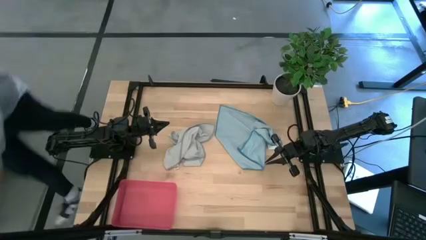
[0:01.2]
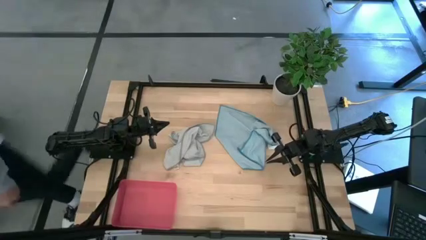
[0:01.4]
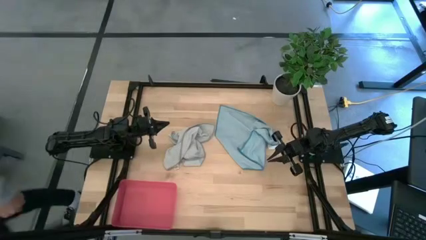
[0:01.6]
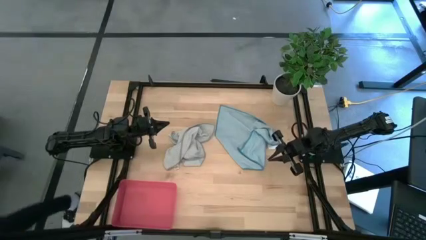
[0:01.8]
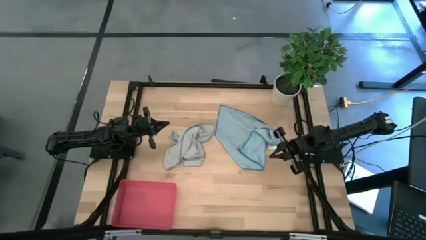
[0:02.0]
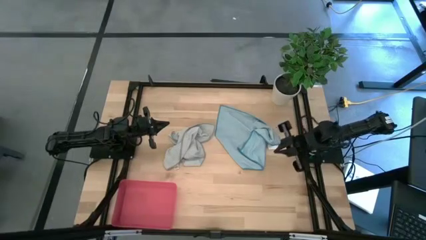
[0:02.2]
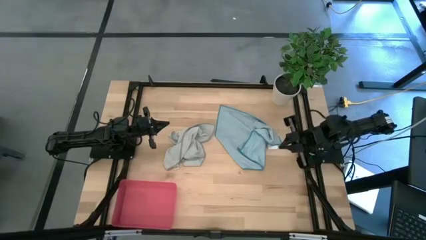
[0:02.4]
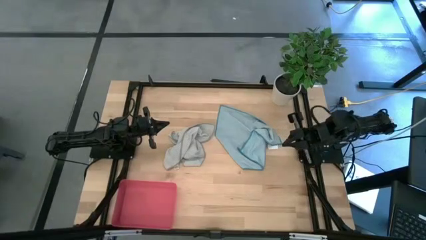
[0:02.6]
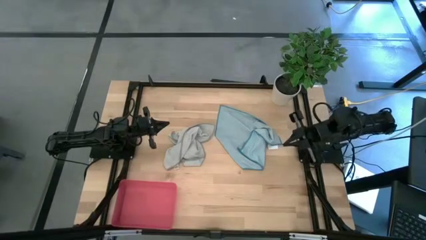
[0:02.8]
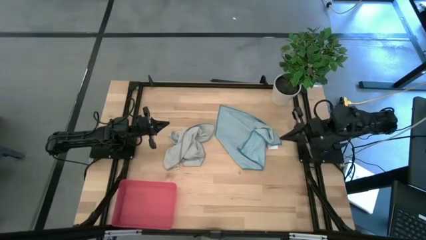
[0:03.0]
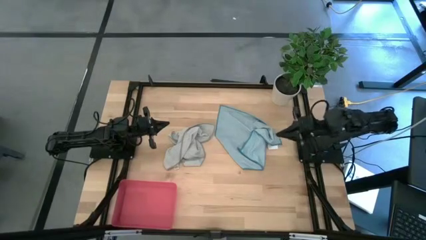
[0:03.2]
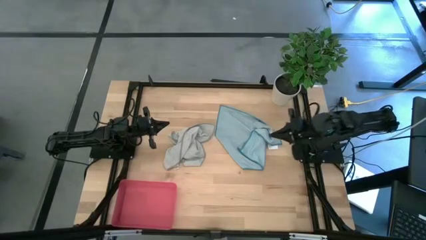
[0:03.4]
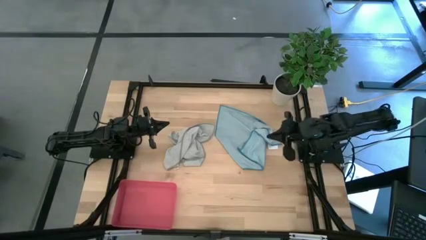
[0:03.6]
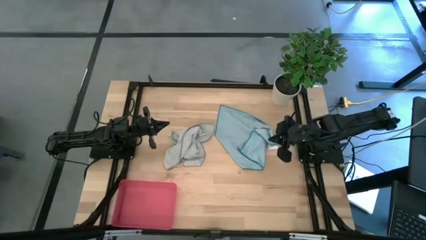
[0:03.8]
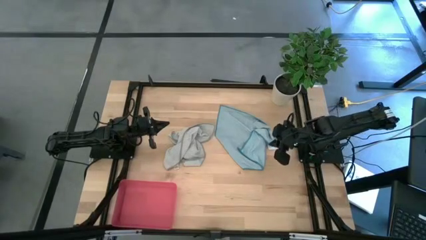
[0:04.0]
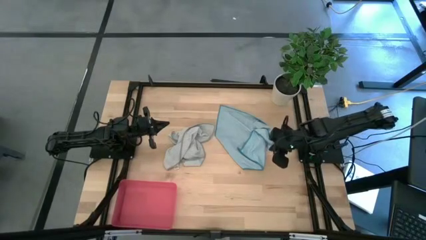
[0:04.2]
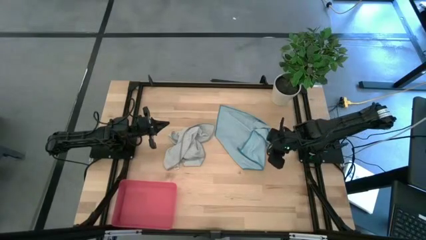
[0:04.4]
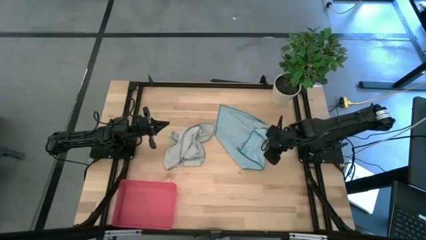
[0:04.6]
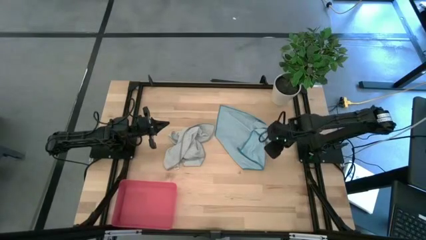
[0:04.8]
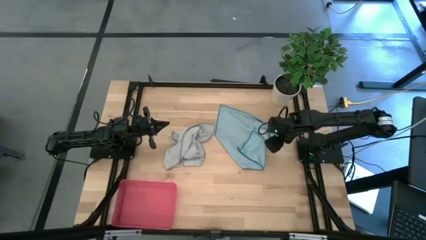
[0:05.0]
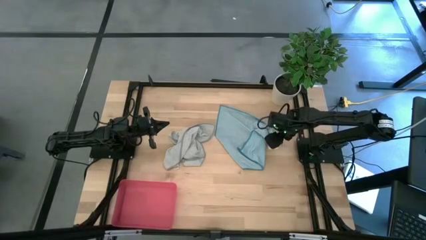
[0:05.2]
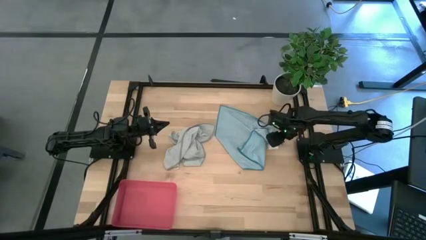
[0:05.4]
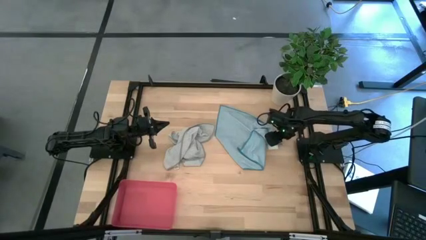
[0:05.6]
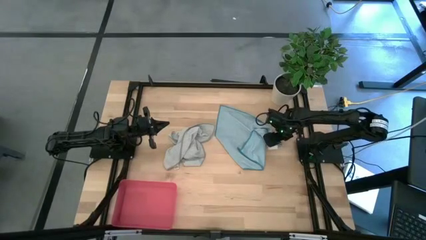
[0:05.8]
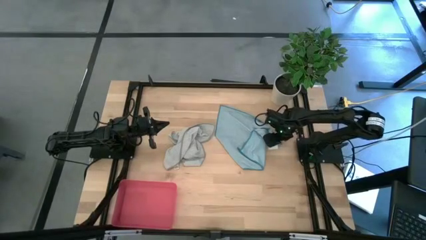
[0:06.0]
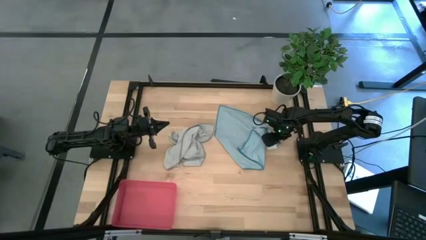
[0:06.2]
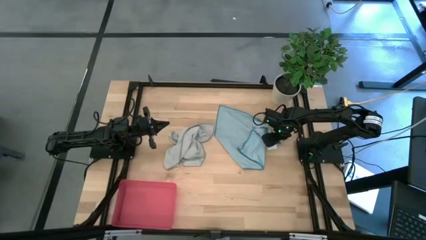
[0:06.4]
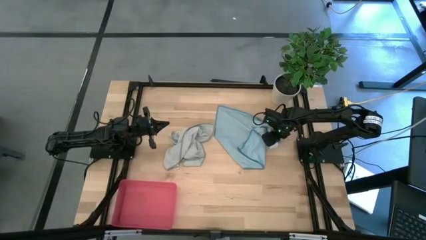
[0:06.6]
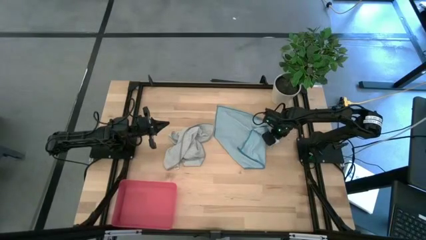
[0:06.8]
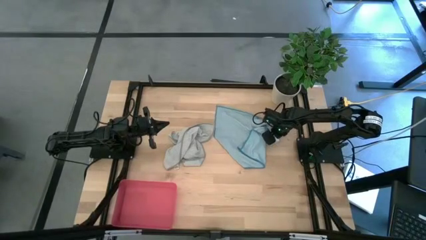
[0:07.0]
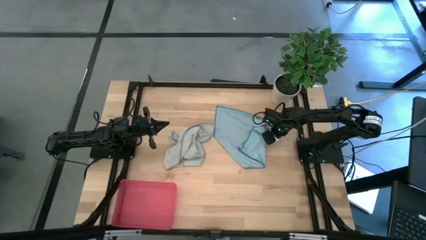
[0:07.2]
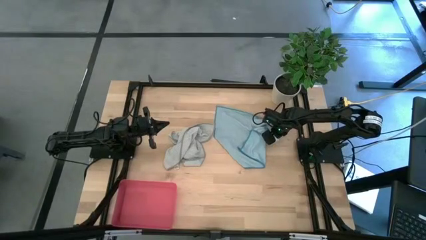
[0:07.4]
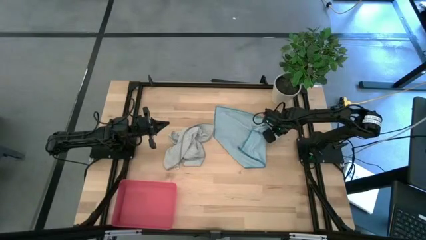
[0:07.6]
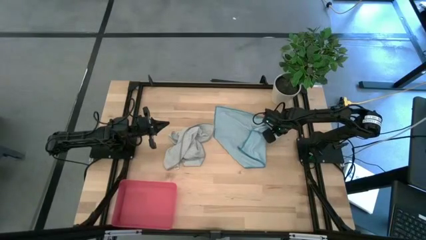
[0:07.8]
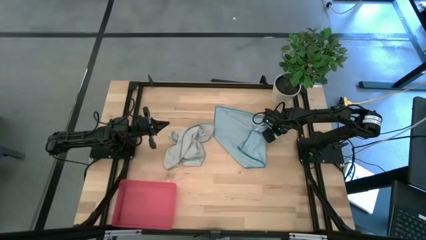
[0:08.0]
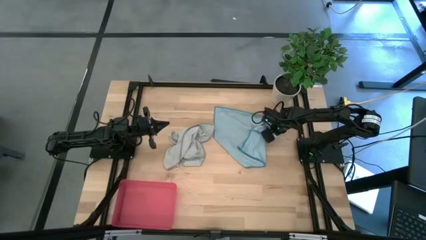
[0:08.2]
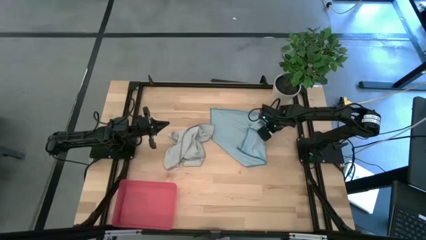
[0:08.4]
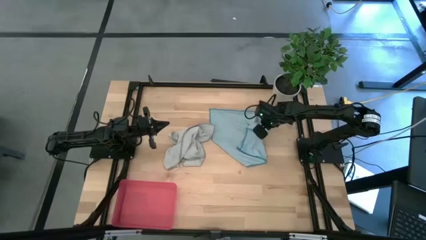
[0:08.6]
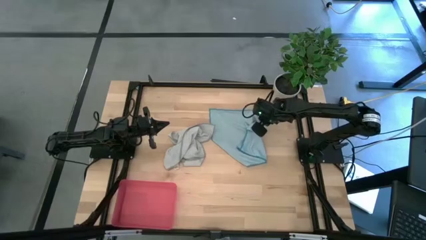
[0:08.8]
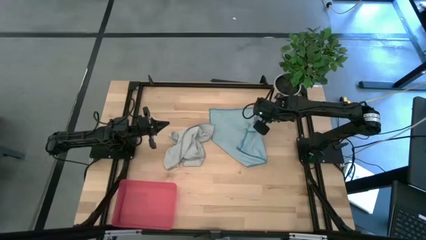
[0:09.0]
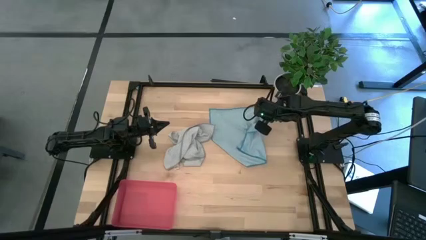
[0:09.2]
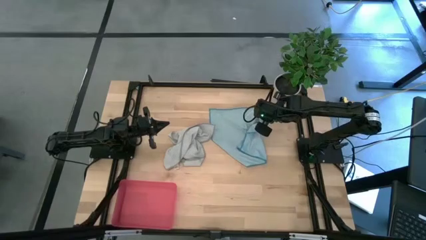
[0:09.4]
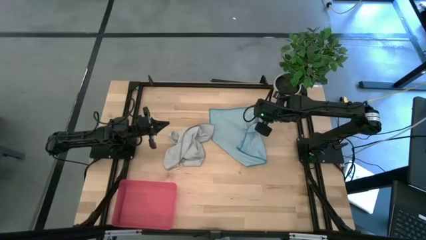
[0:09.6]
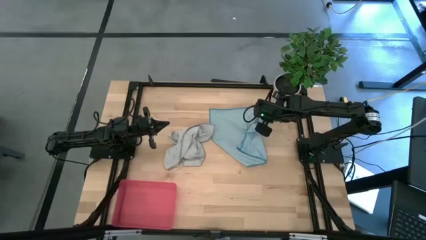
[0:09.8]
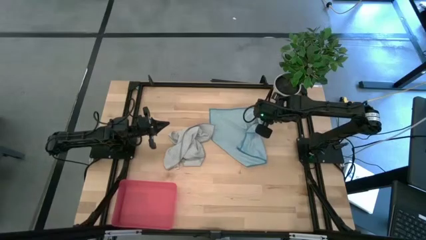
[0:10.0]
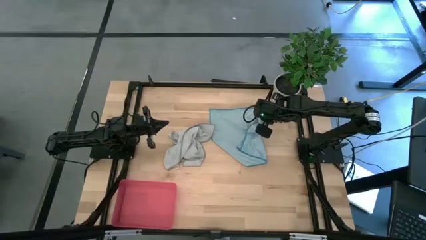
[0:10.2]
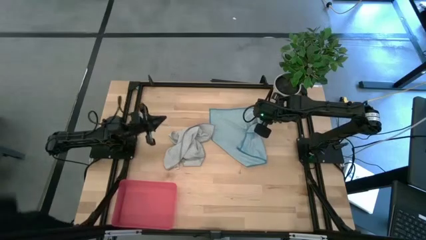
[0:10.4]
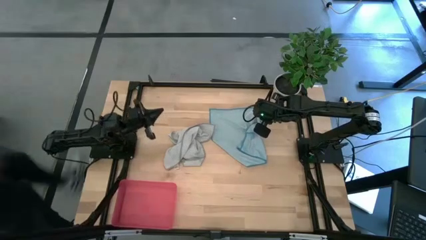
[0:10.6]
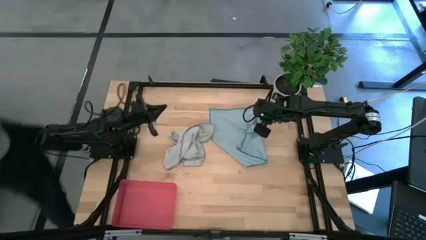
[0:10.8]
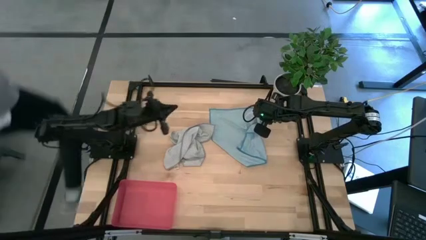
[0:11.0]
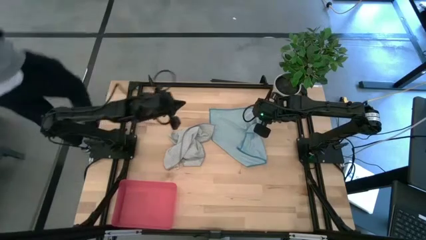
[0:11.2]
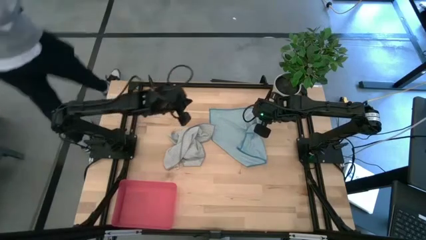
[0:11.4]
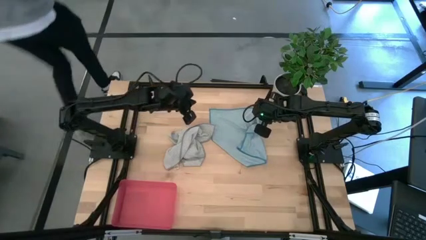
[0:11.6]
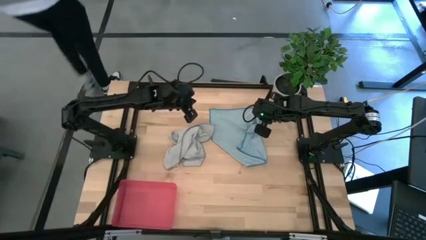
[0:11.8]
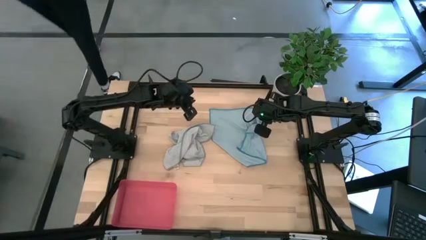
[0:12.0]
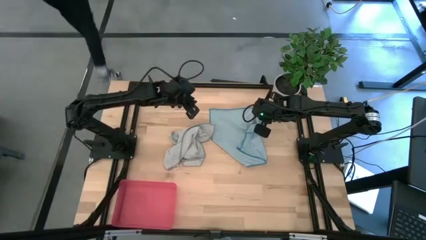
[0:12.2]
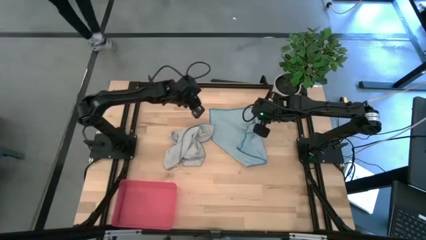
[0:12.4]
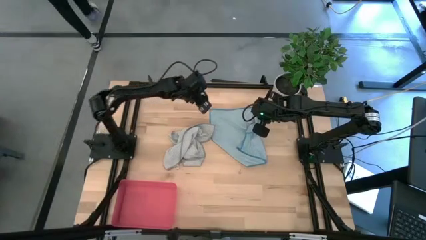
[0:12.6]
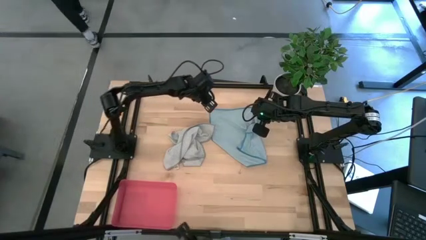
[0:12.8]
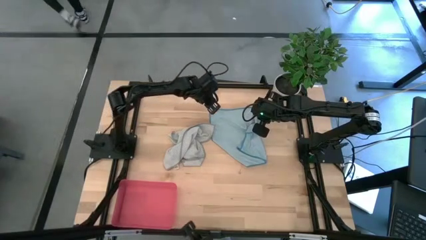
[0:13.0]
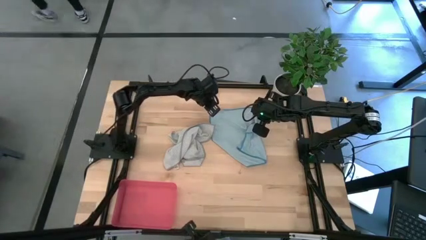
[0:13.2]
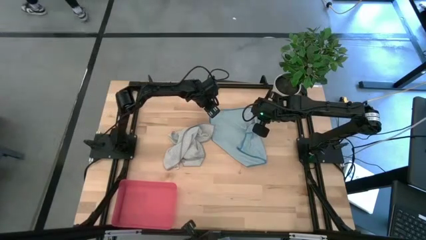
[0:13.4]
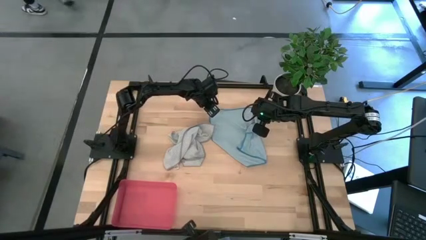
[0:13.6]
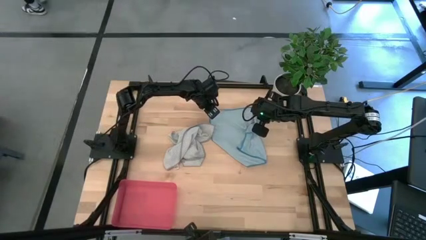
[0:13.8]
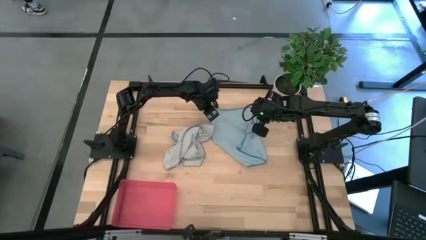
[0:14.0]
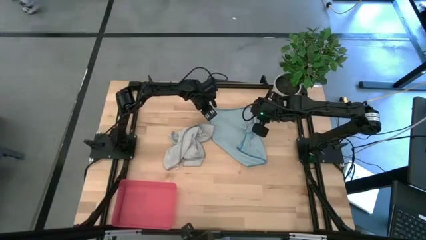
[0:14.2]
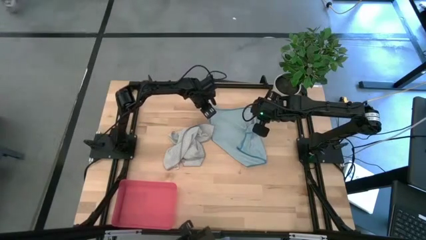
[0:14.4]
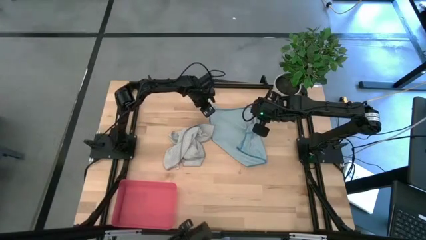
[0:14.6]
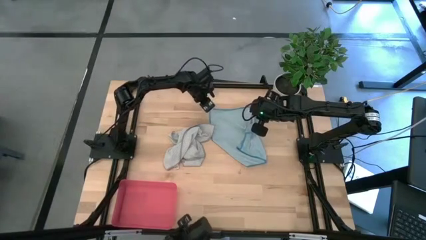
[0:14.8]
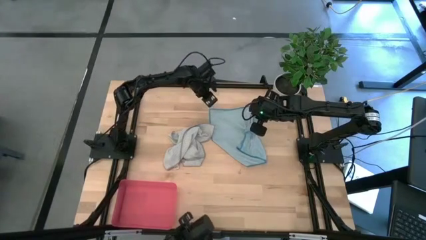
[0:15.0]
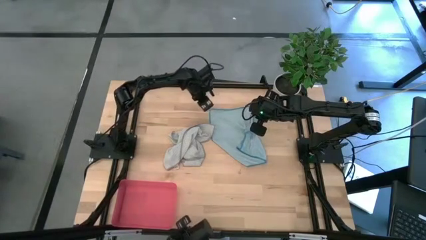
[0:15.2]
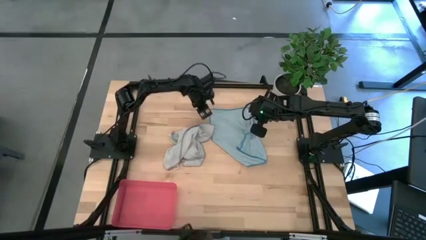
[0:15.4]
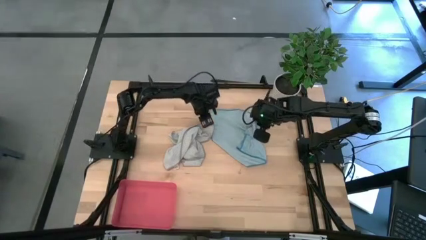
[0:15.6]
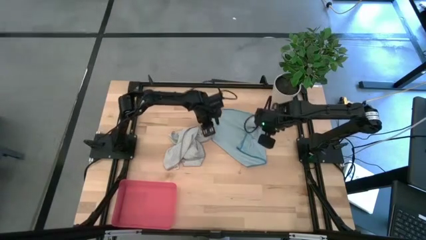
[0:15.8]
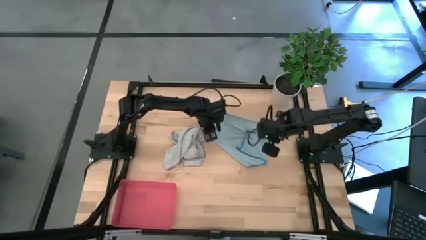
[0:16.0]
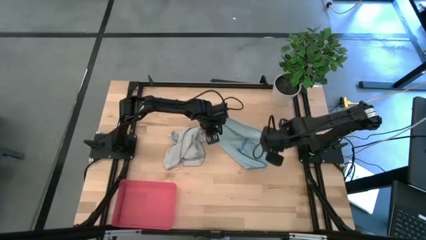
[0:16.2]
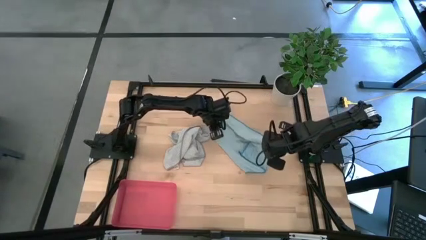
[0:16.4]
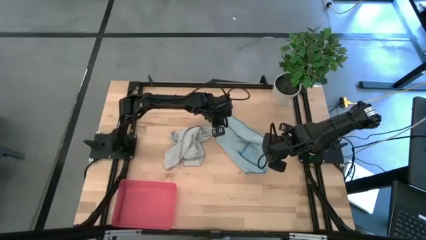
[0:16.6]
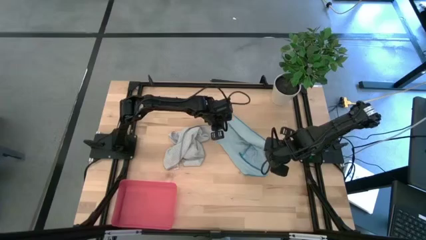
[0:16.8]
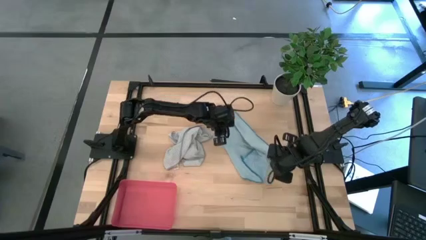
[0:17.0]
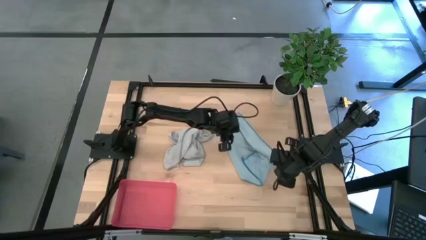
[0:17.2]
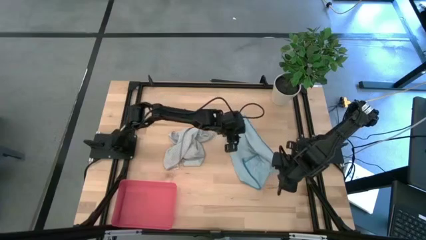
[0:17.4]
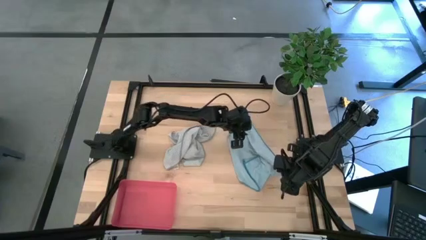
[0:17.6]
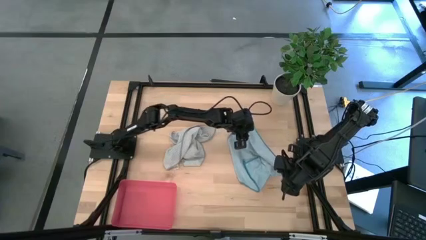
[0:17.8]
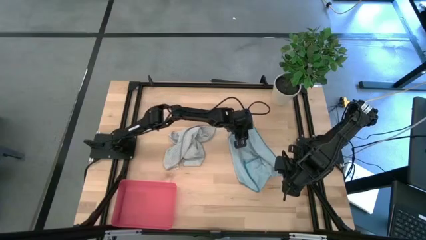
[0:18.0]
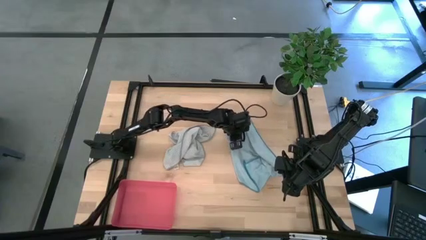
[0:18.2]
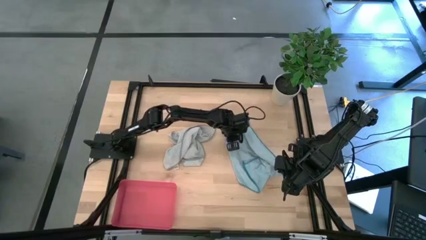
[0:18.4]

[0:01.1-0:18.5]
Task: Roll microfiber towels into tight, uniform cylinder then place into a basket
Fold the blue towel
